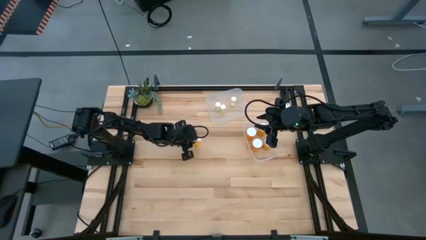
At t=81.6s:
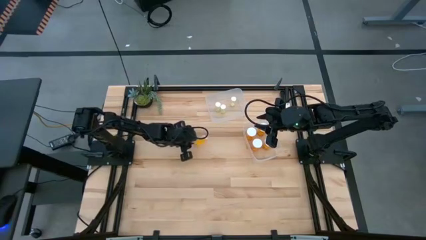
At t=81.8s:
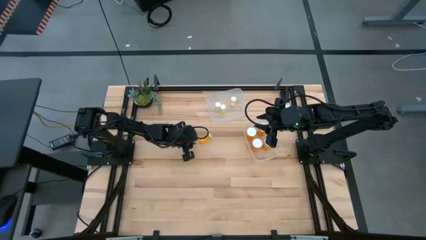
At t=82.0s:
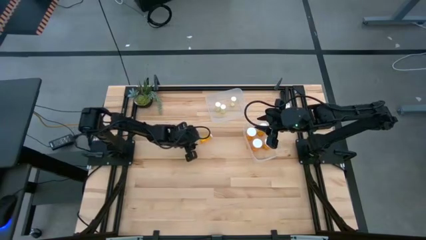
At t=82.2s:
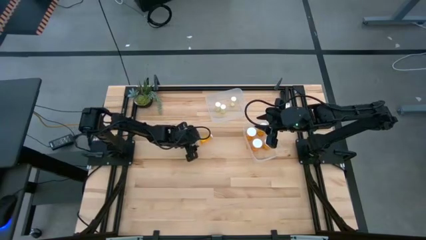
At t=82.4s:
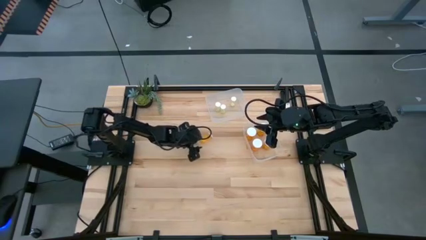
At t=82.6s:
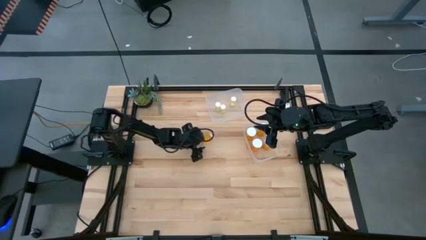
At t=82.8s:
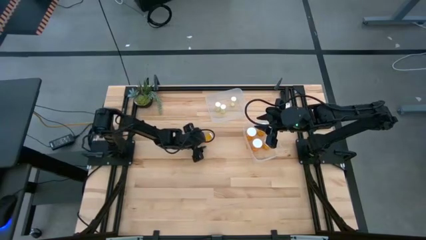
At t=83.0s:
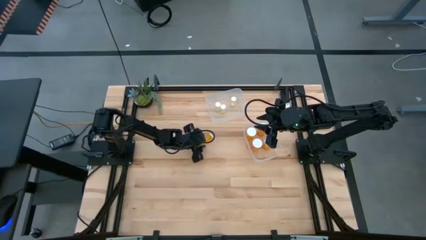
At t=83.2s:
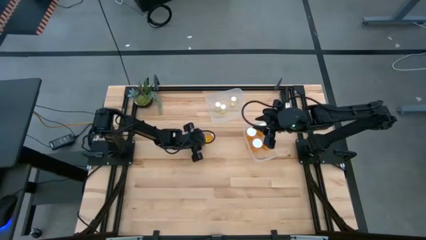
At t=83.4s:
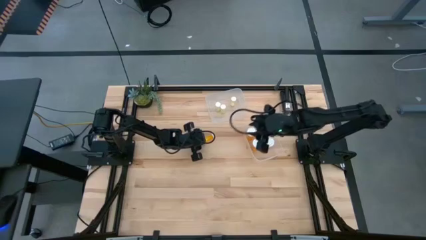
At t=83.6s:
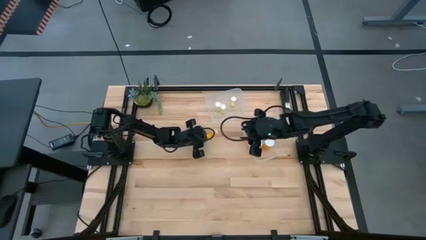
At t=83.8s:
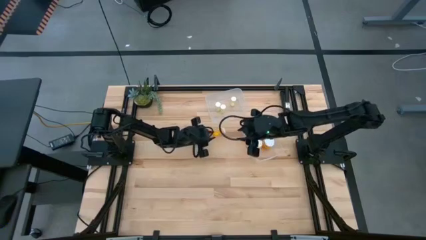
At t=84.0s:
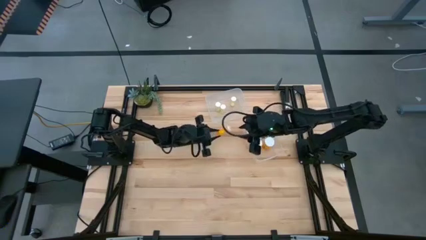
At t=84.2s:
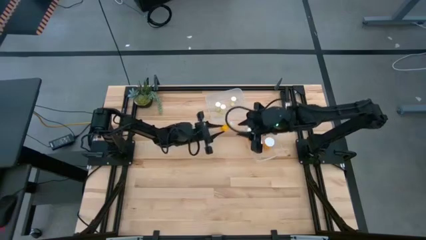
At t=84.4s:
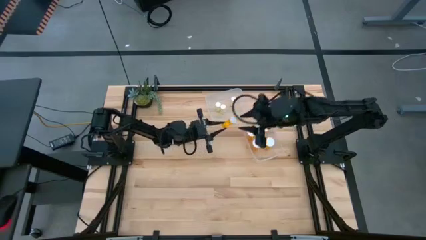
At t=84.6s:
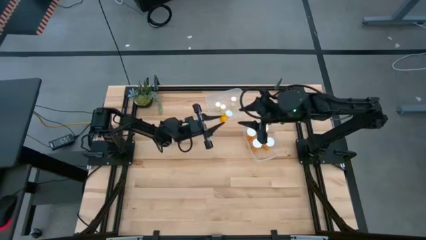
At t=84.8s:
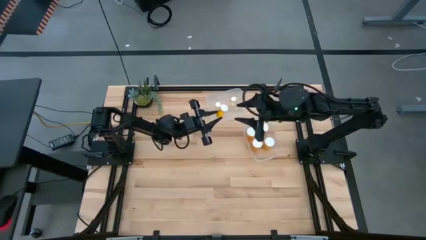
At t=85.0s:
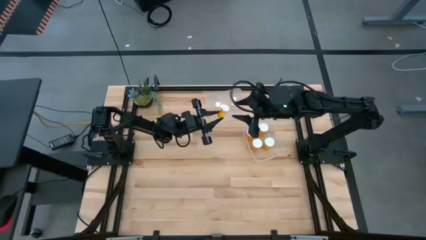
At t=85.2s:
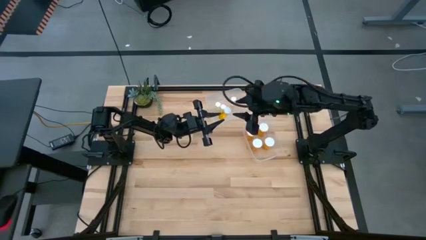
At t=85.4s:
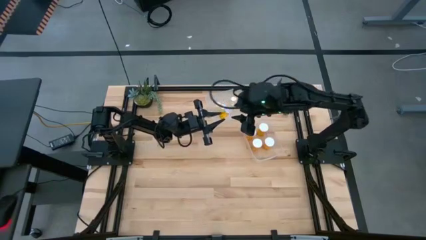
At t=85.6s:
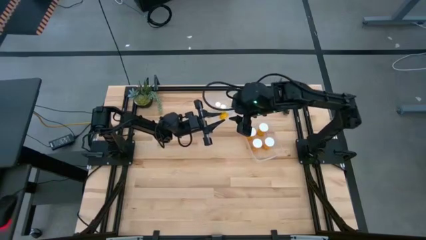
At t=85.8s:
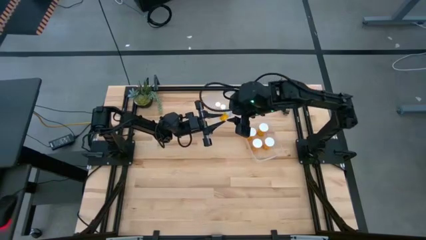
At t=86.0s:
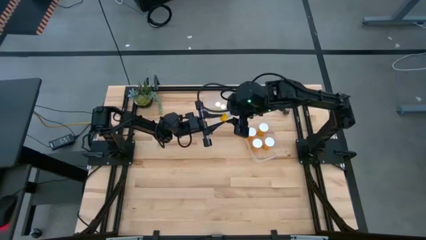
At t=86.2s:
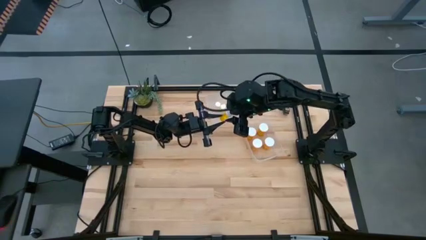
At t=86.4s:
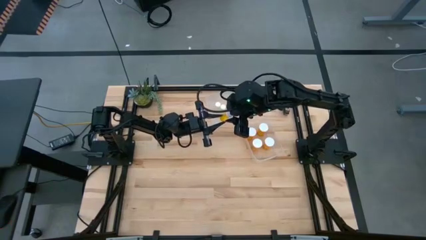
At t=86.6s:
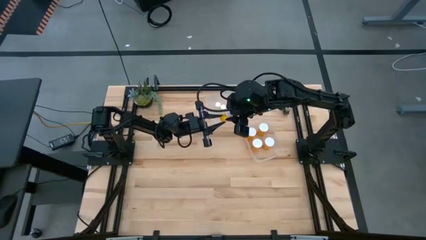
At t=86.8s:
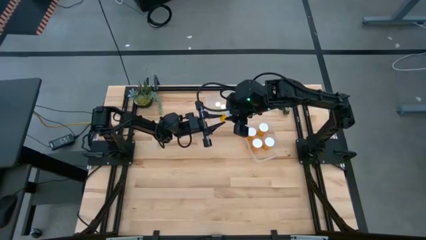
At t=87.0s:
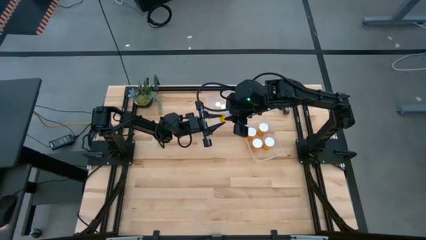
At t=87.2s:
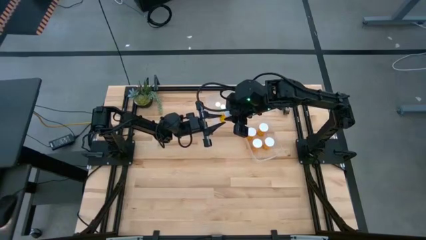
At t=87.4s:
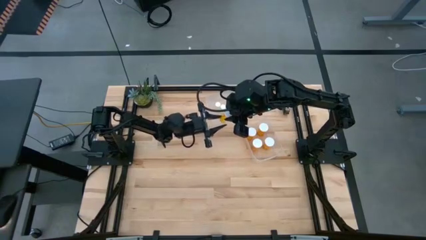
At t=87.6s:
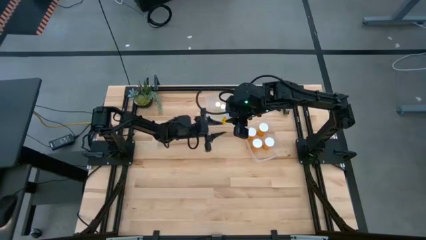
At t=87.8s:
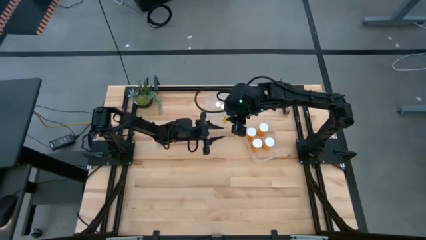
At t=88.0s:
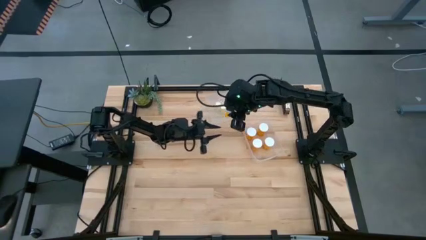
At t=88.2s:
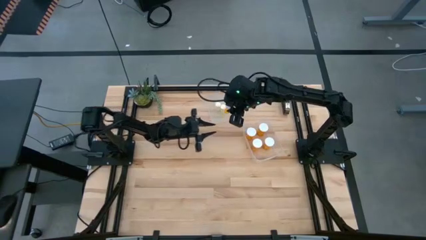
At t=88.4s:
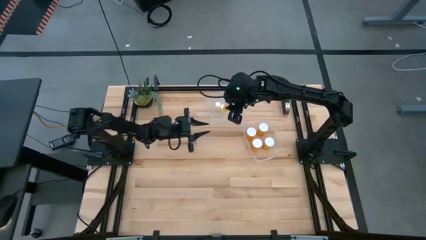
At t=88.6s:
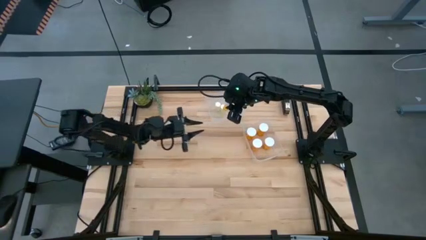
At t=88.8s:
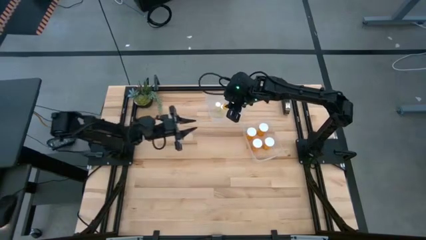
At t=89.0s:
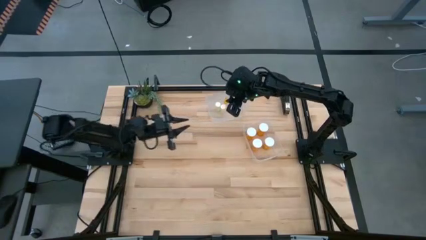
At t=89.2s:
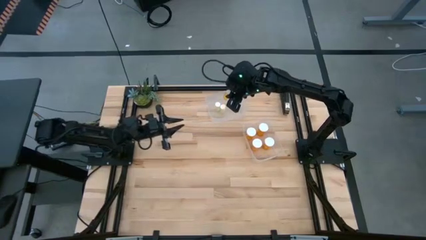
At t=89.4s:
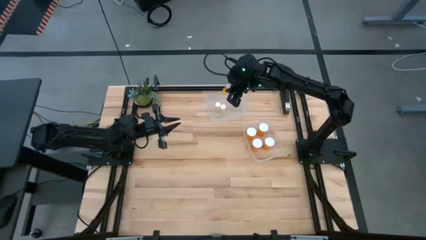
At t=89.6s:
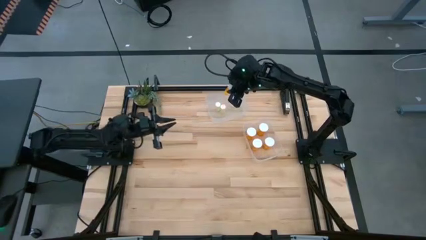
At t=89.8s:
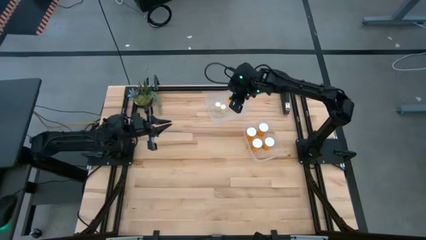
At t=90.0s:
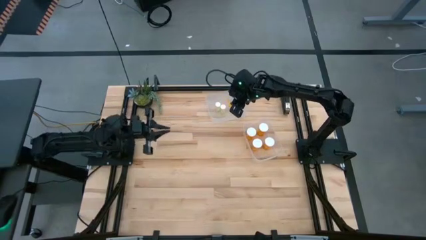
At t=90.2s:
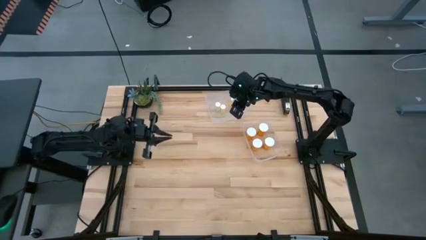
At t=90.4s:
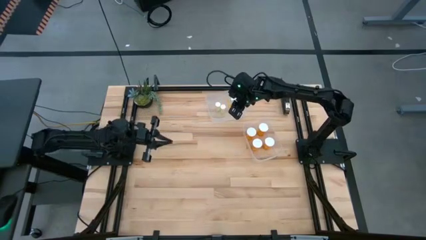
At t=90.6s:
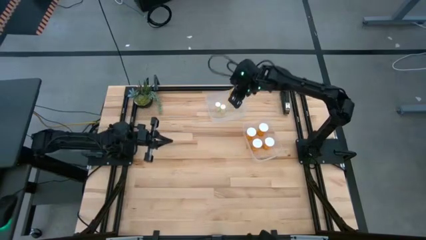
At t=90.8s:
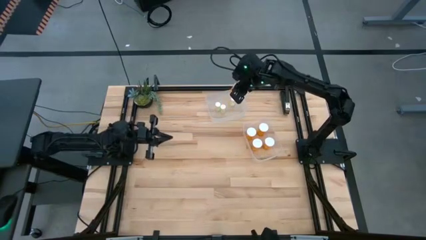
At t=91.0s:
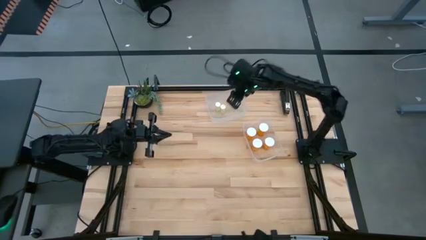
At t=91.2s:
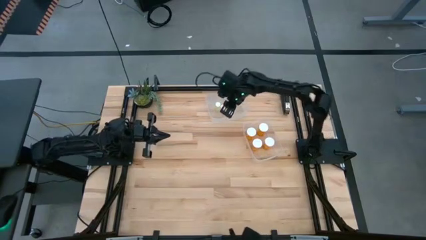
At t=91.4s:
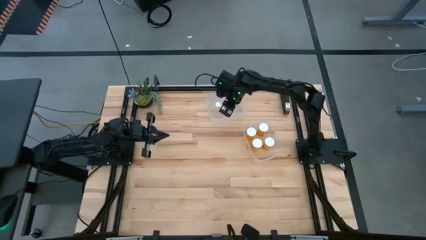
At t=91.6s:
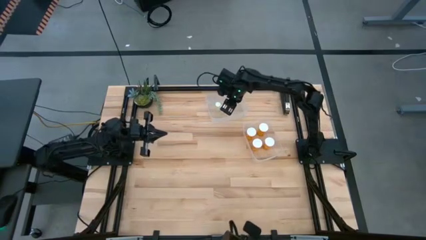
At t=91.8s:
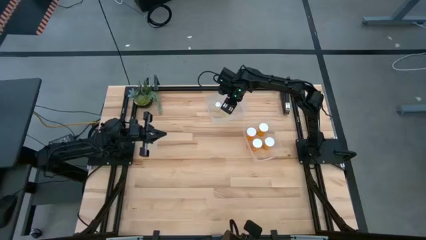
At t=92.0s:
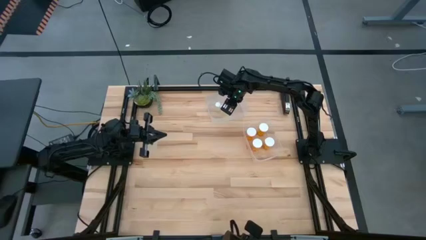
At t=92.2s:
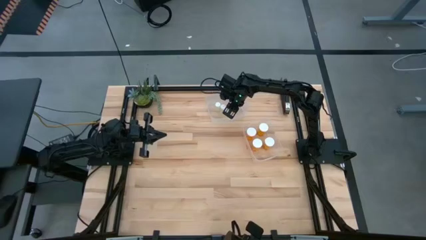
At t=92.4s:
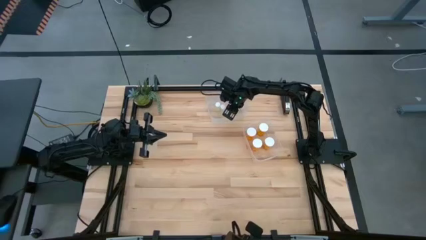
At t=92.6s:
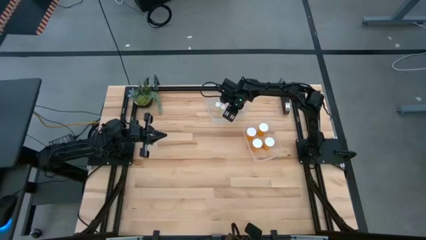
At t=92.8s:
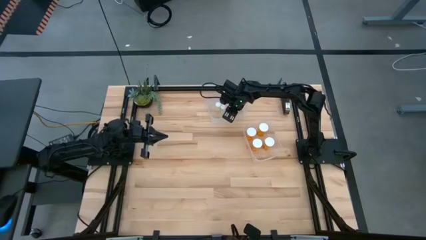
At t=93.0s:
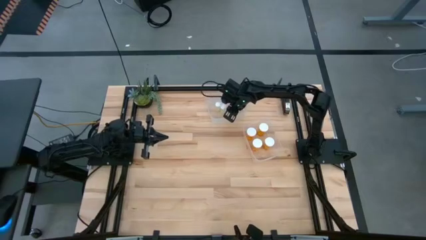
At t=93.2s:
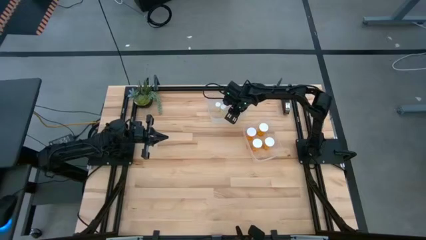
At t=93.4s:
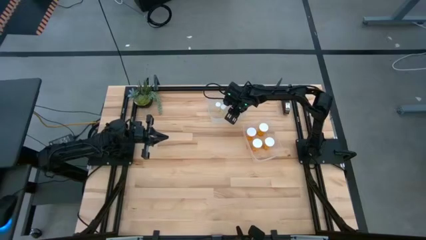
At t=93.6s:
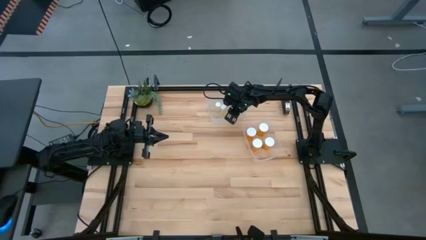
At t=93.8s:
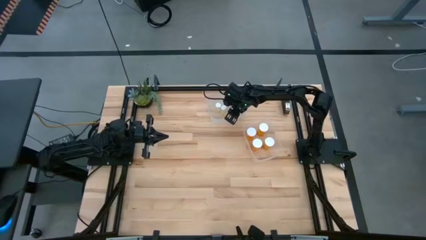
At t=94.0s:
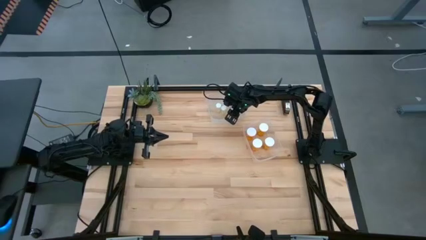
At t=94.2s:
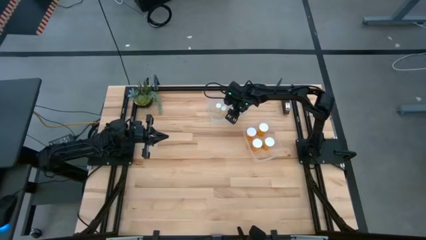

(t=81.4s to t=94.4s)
Task: Pick and place medicine bottles into bin by pill shape (circle, oval)
Put the small orange pill bottle into the top transparent bin

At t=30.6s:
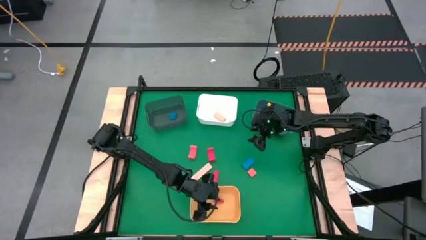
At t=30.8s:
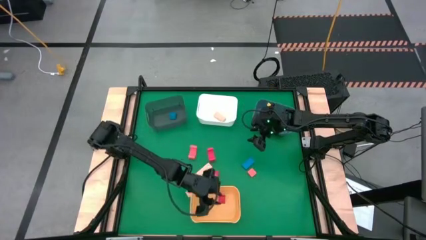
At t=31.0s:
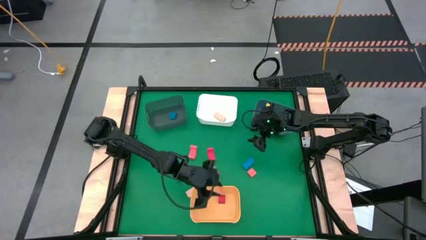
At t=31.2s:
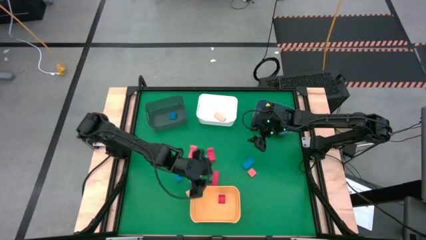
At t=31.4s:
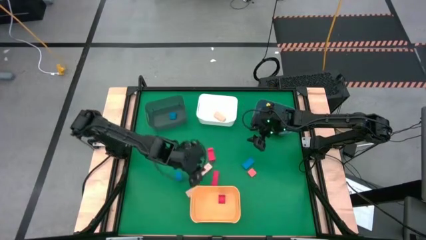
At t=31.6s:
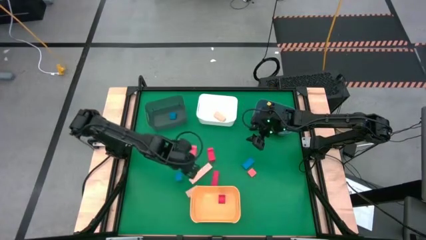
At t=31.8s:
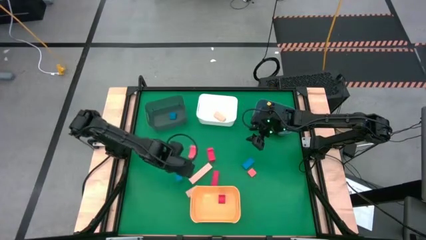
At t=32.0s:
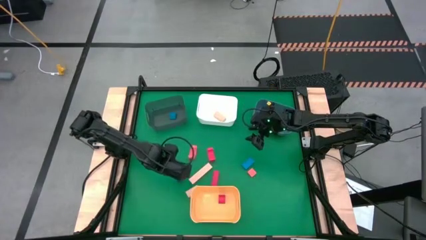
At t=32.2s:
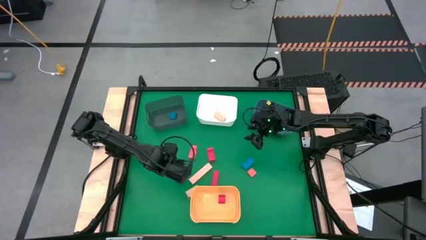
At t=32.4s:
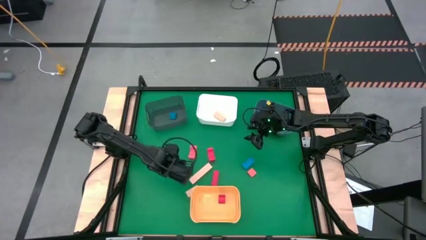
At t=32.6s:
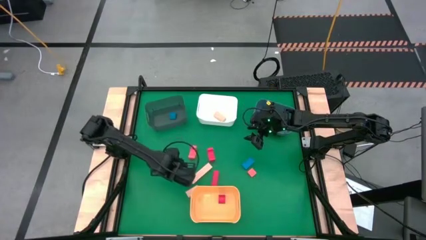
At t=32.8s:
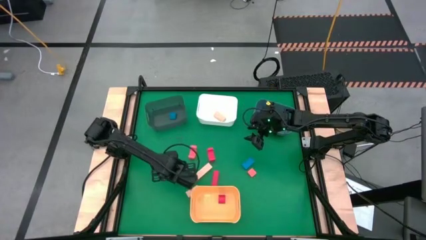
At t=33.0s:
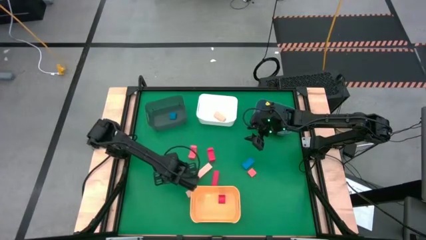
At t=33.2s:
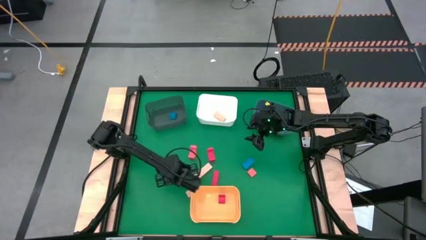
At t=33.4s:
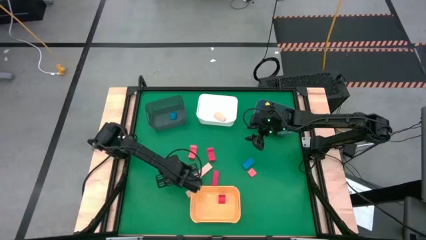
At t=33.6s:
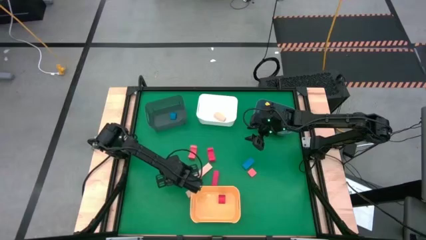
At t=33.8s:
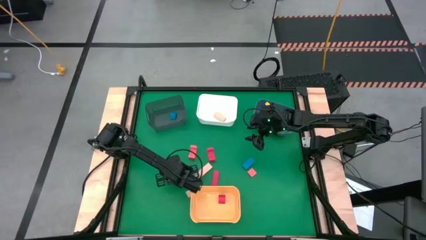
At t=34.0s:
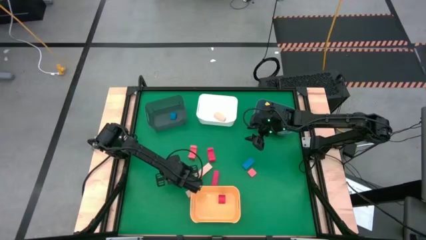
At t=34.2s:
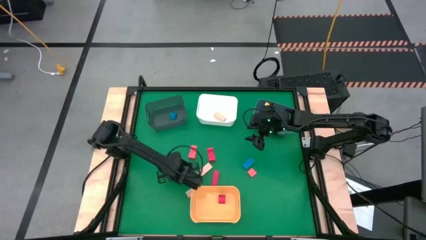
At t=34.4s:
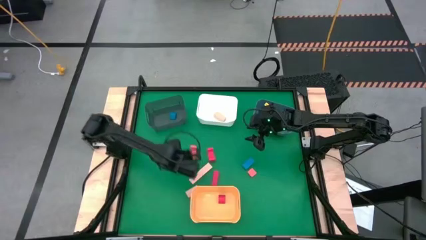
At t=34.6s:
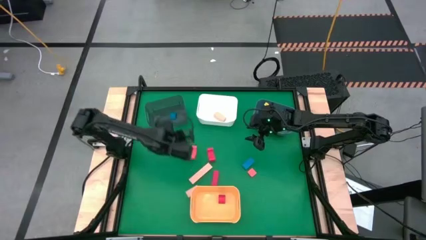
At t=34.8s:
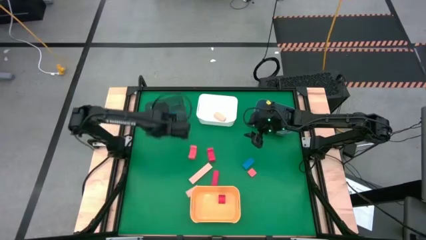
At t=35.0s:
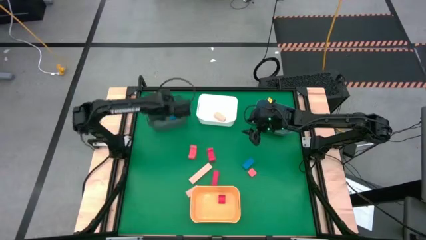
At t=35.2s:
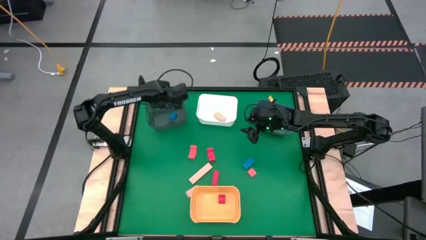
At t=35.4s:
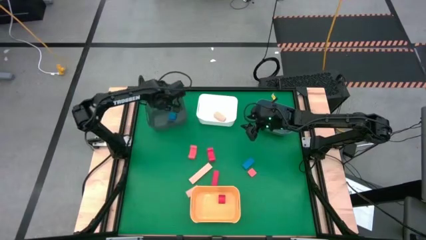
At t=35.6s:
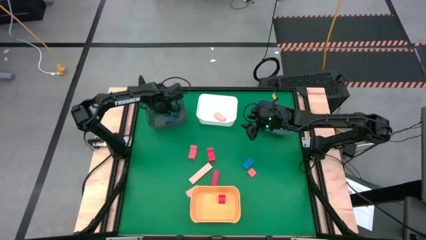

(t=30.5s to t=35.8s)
Task: Sort & place blocks by color
Put the blue block into the black bin
